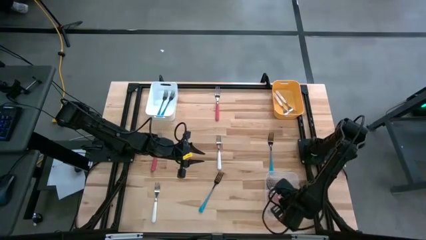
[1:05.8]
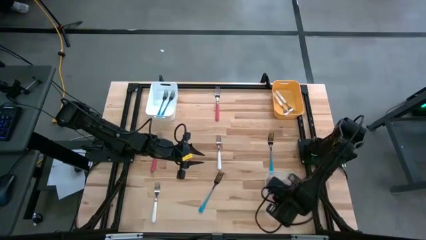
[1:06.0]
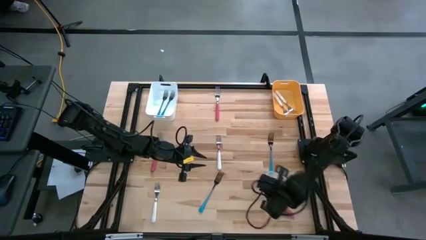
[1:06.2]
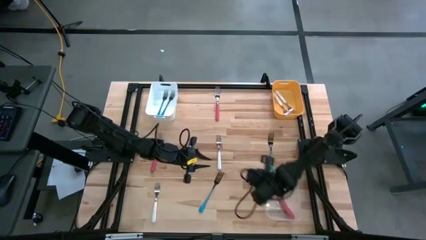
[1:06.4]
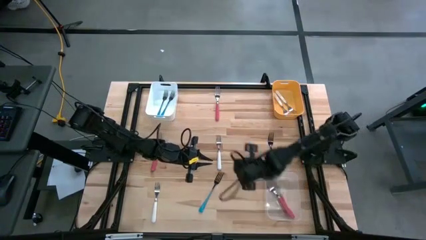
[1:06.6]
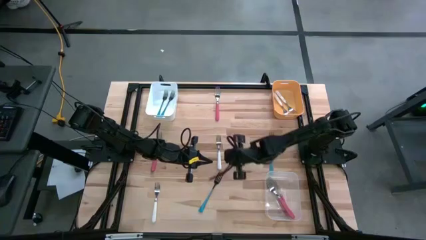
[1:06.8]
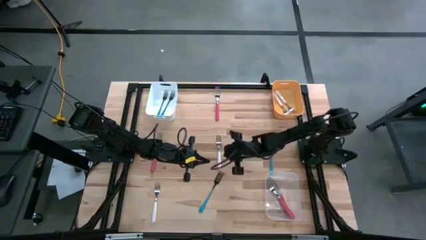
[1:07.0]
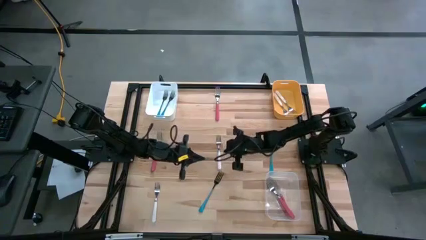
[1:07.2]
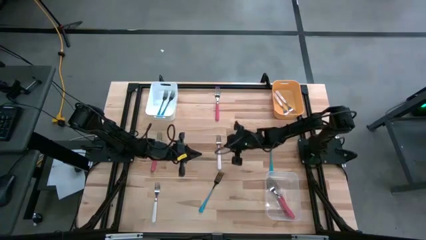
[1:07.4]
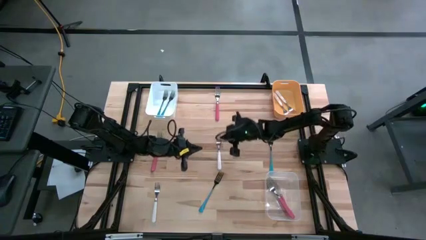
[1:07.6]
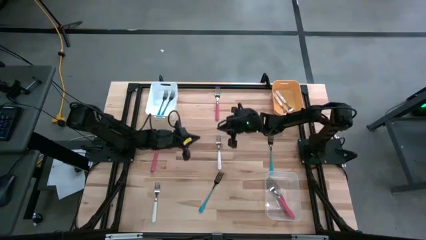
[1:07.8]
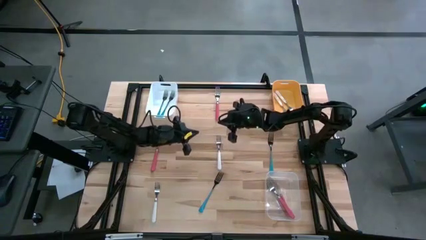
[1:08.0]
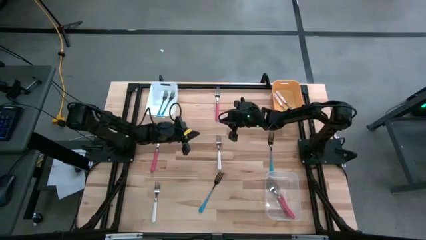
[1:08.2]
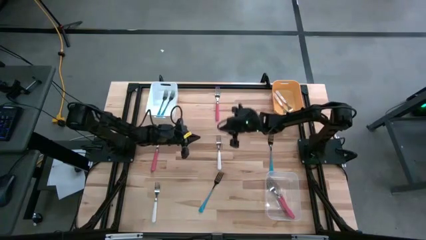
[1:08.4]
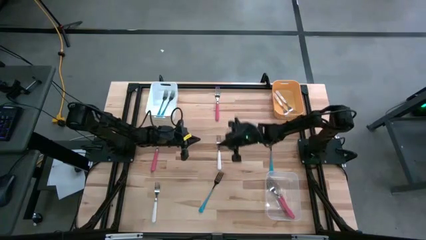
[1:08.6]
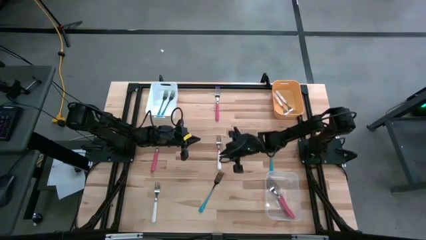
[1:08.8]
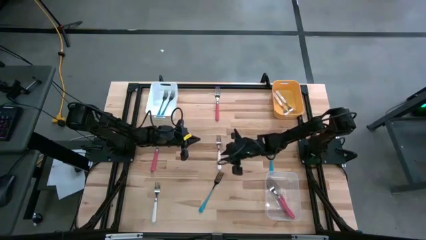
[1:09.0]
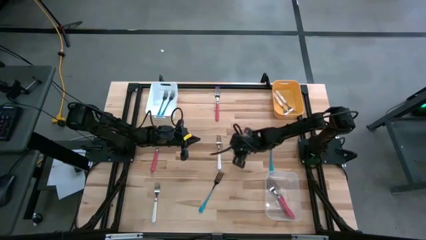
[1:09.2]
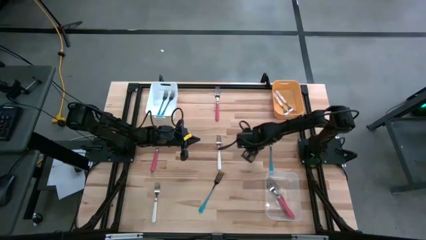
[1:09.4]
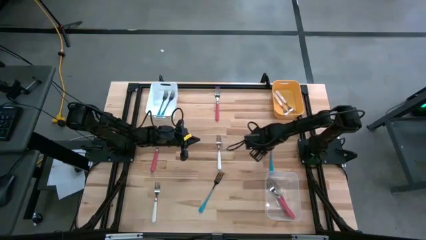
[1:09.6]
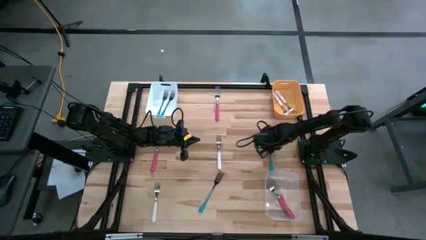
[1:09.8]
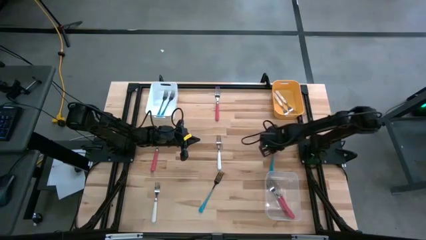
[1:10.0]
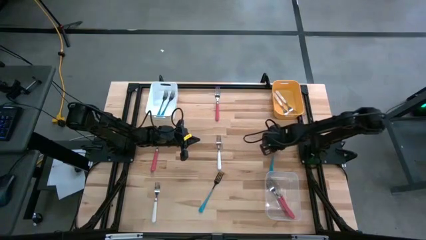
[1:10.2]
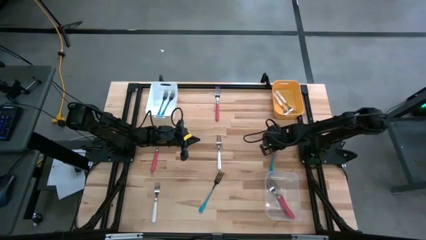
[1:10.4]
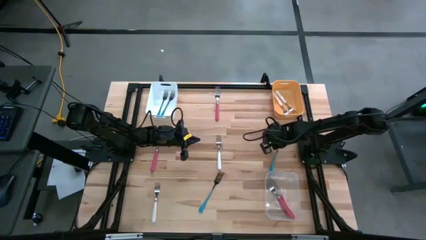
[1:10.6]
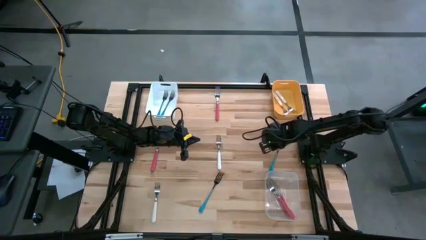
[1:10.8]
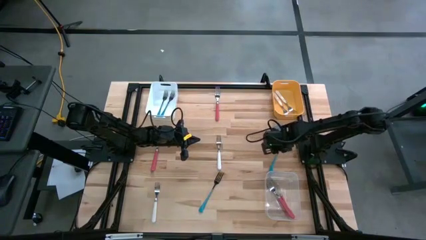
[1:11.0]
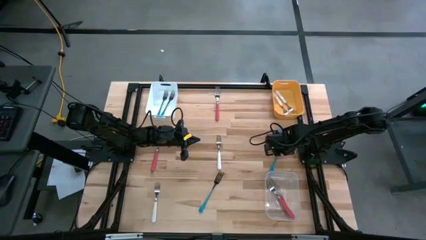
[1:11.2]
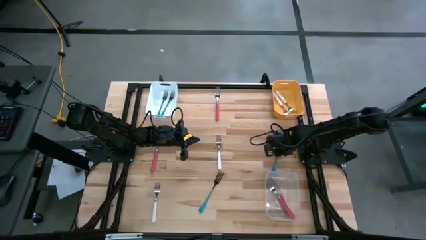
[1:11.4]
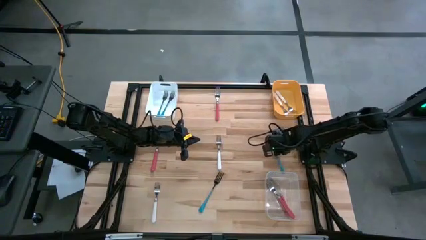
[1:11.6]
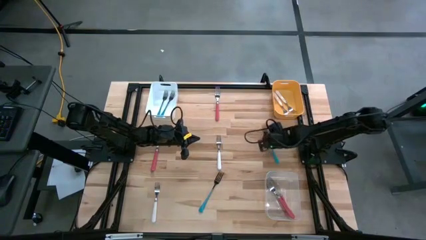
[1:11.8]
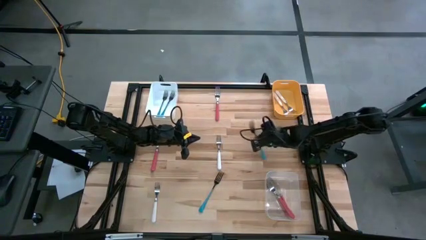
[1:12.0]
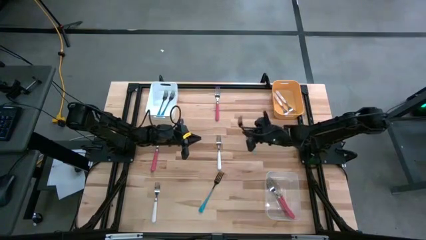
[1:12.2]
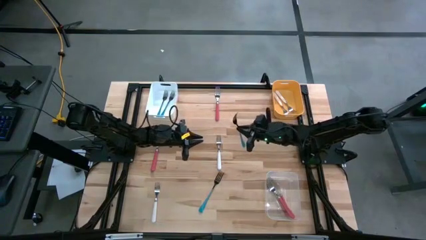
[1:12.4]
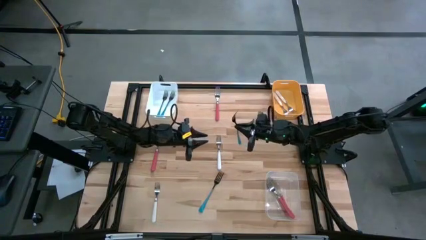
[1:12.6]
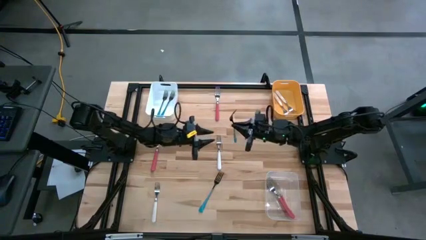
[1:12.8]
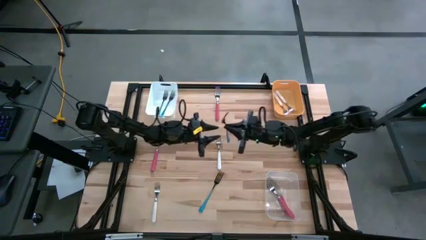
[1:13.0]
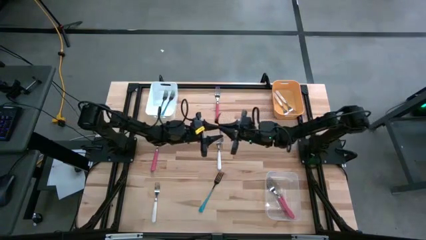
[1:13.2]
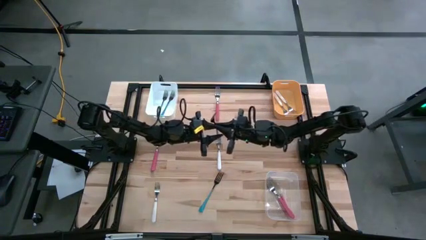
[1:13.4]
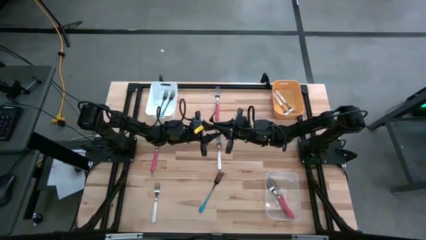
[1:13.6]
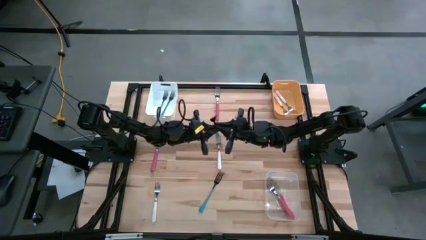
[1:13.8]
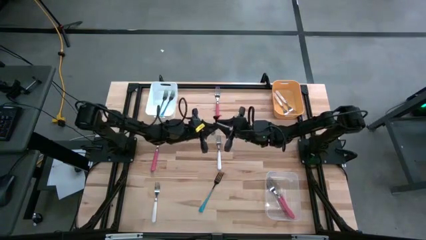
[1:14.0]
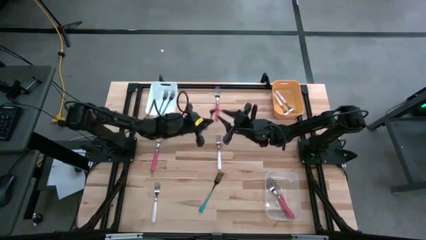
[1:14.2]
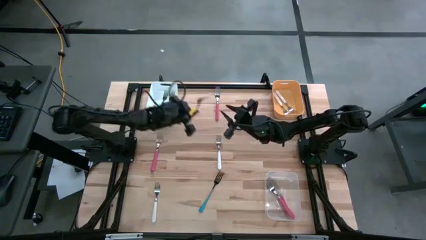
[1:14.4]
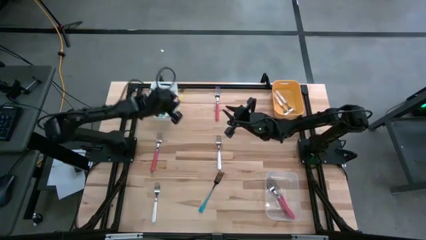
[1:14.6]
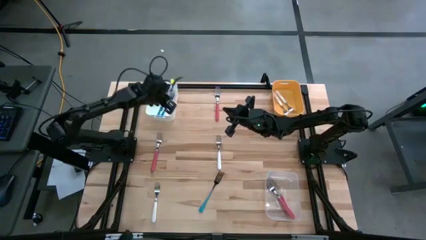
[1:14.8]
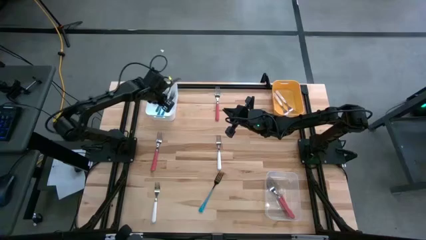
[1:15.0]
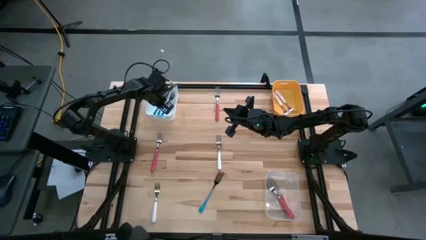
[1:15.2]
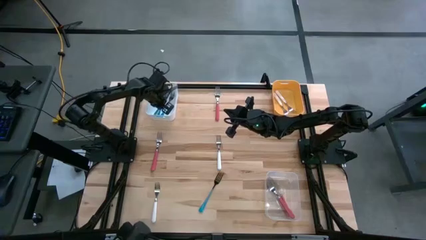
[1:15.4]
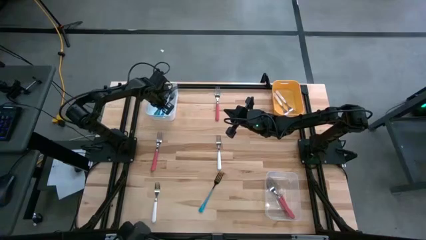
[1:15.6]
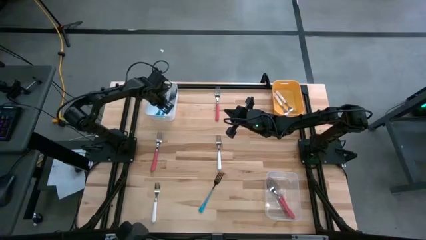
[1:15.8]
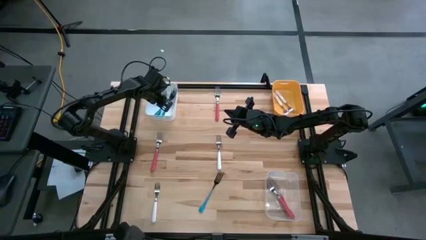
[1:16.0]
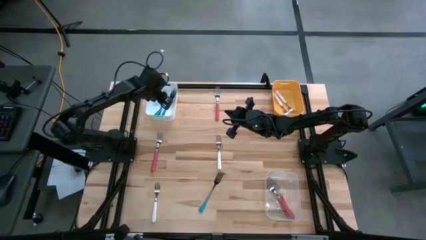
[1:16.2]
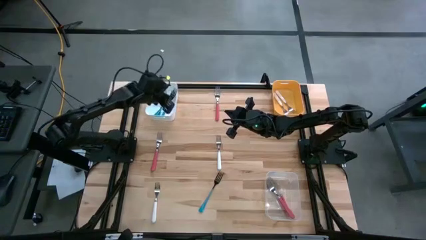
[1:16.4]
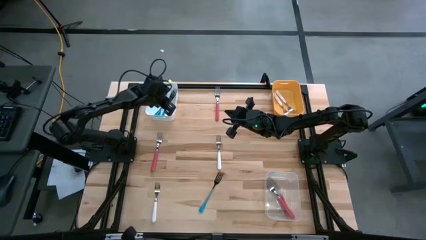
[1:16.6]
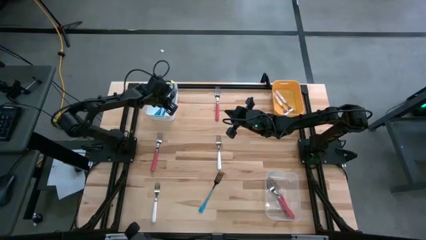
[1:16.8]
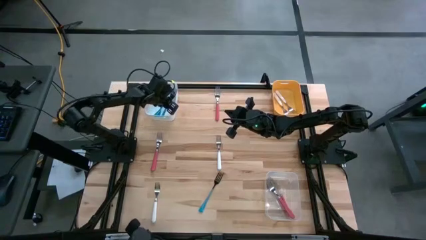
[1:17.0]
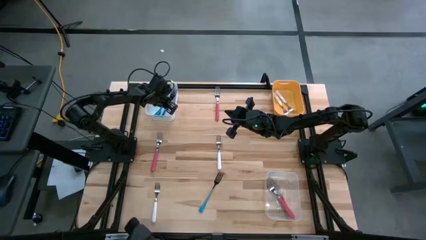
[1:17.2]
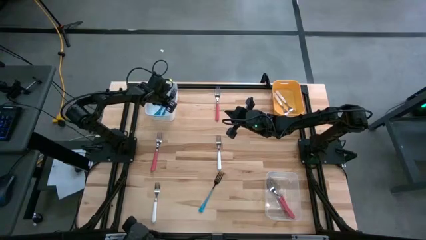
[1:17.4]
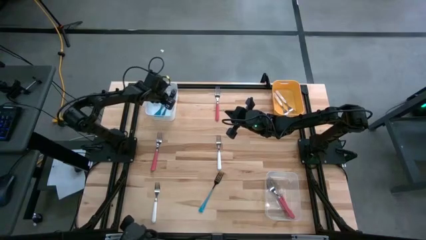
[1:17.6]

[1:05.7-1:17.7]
Task: Sort silverware by color (type)
Put the top blue fork into the white bin

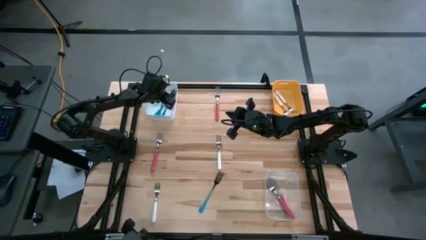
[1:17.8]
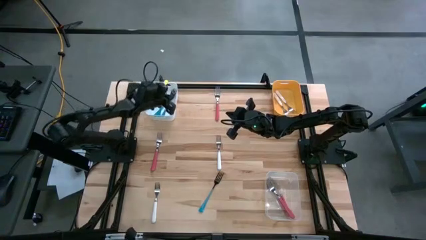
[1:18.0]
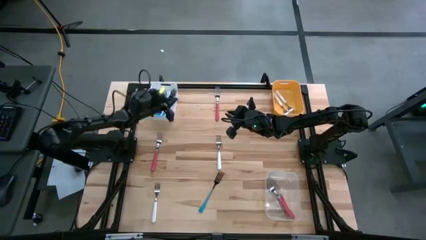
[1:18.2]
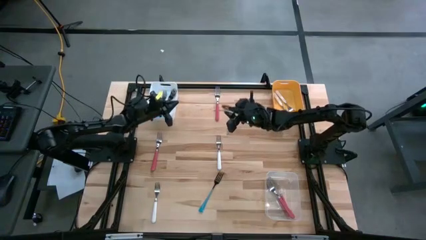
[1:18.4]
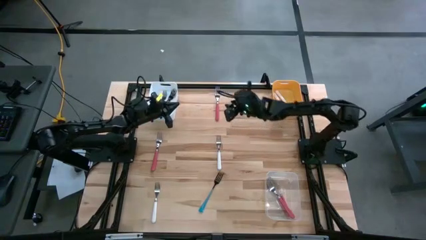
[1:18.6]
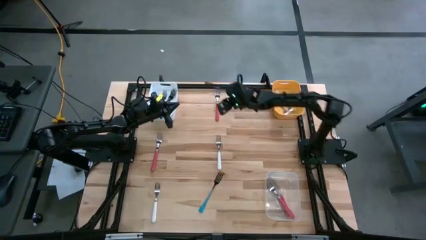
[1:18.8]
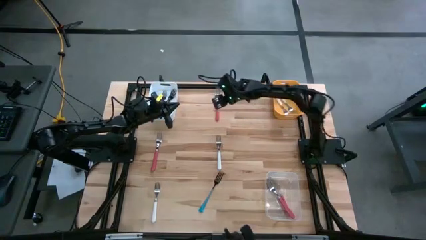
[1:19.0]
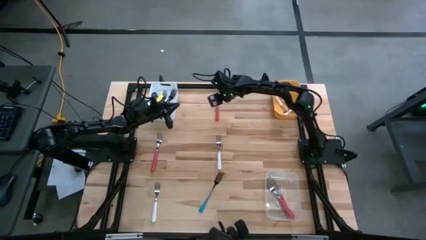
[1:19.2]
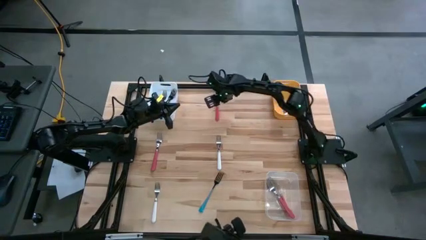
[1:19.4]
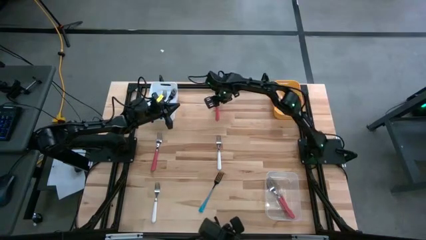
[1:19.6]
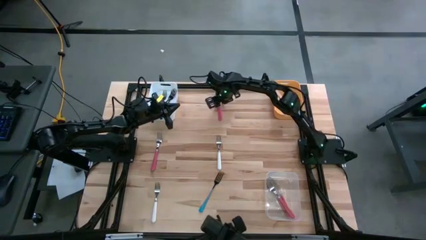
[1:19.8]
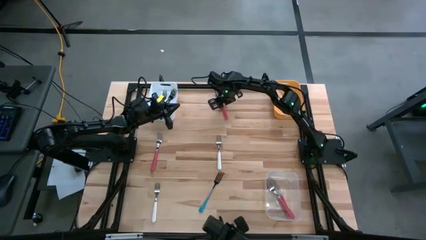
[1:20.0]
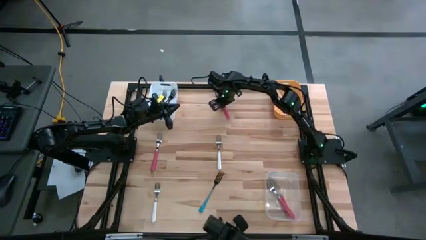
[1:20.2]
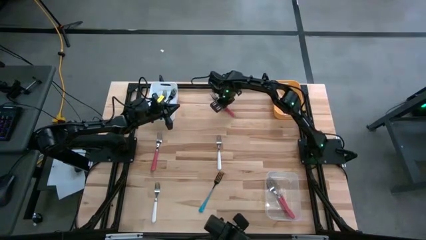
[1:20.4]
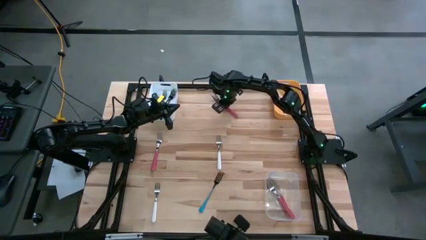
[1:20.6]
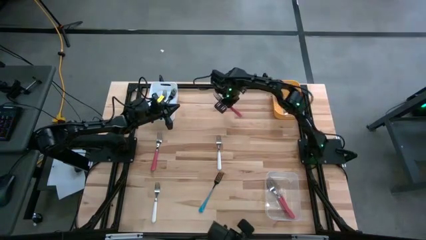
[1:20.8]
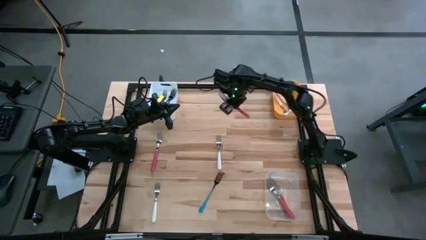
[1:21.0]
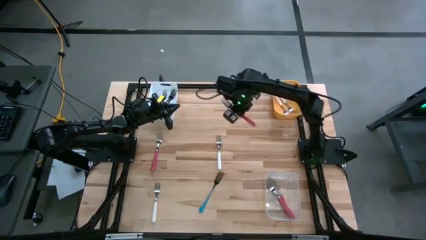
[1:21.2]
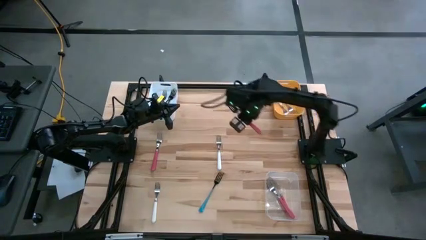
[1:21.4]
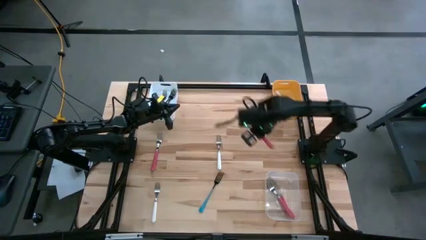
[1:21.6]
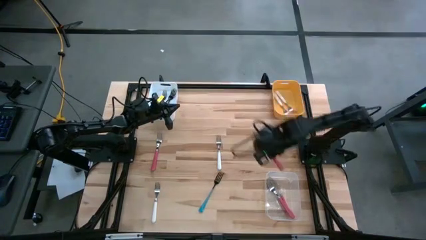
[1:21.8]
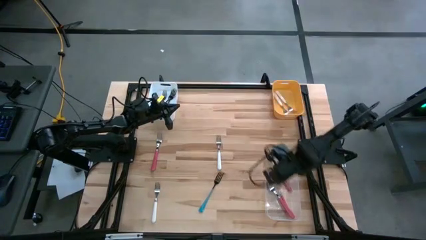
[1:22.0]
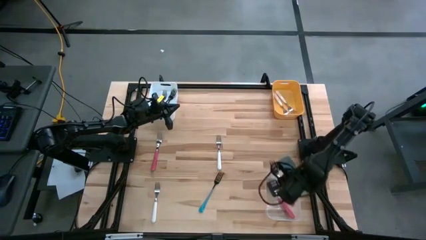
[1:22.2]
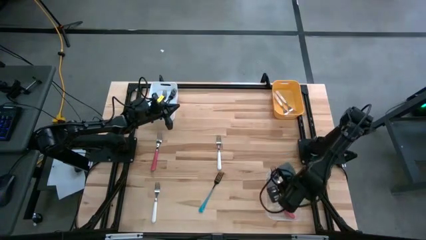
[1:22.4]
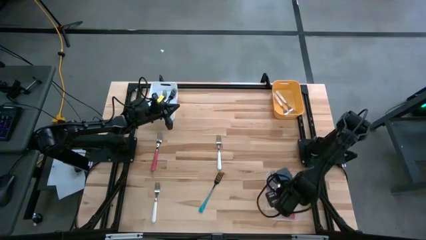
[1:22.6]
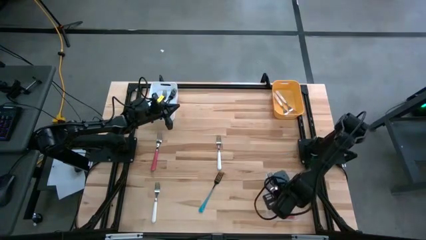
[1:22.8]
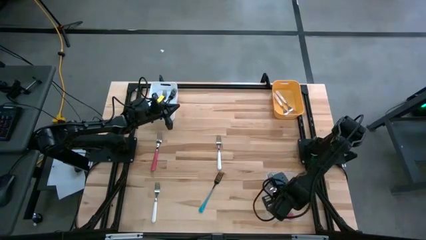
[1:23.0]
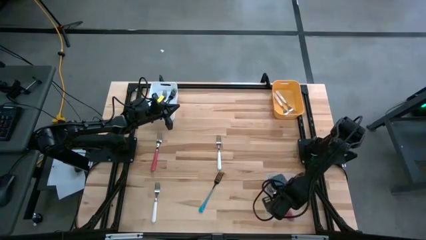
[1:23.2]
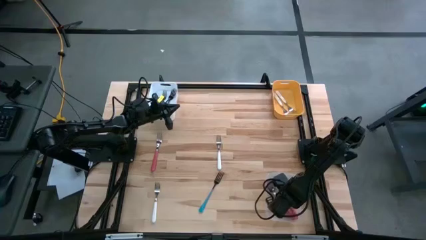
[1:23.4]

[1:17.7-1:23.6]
Put the top light red fork into the transparent bin
